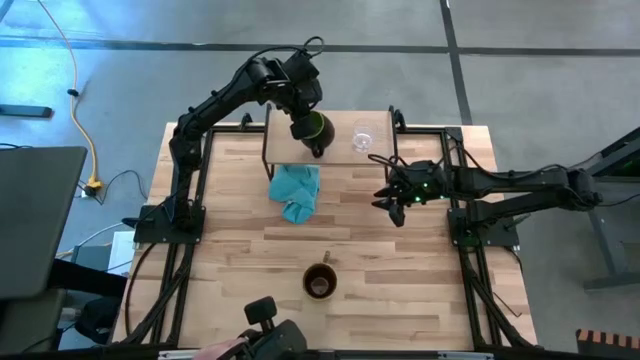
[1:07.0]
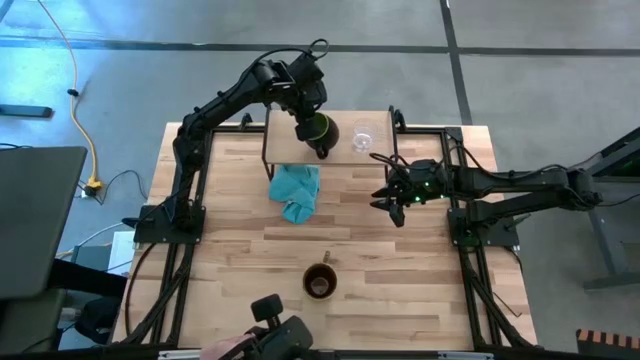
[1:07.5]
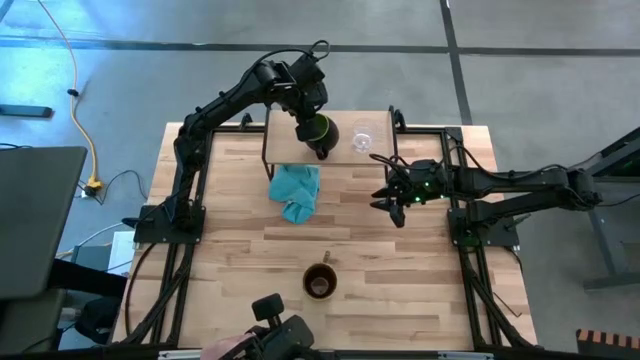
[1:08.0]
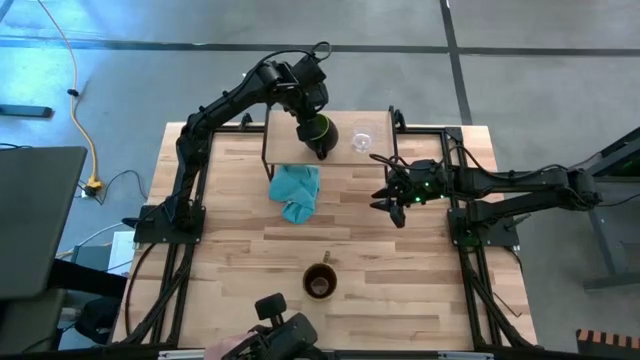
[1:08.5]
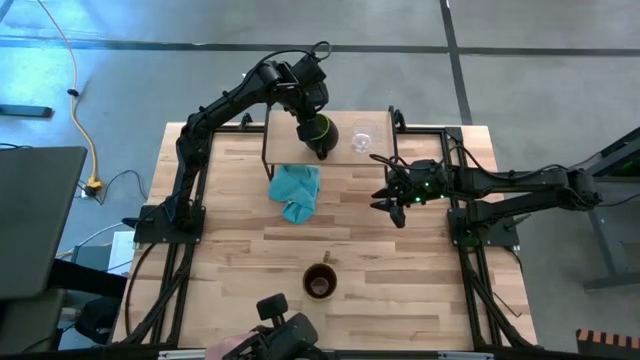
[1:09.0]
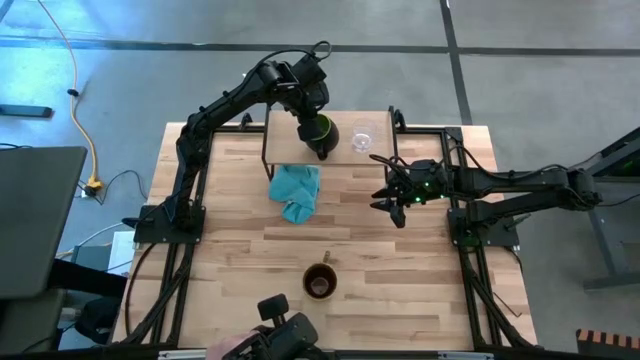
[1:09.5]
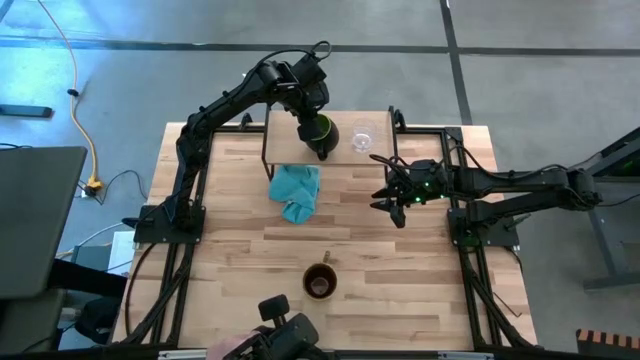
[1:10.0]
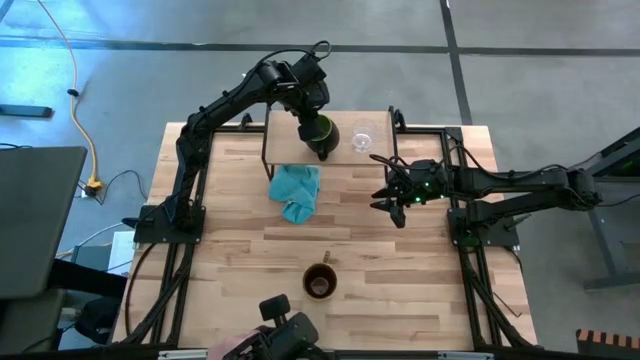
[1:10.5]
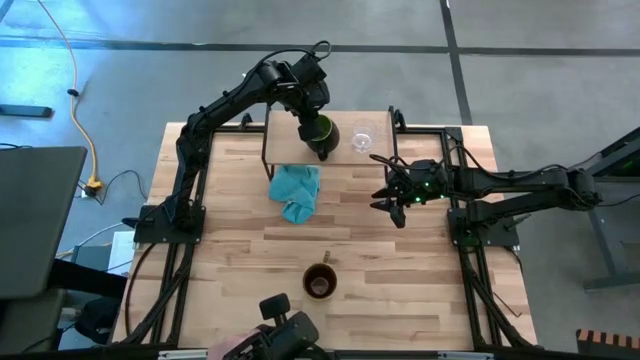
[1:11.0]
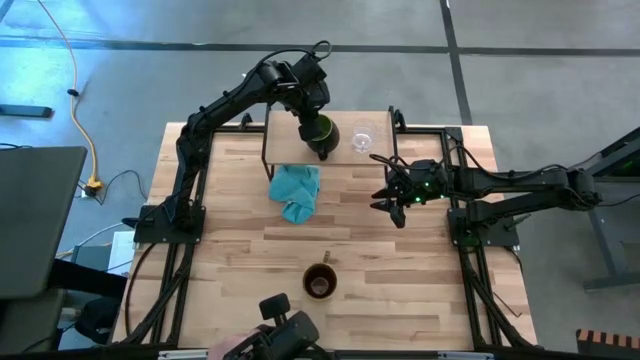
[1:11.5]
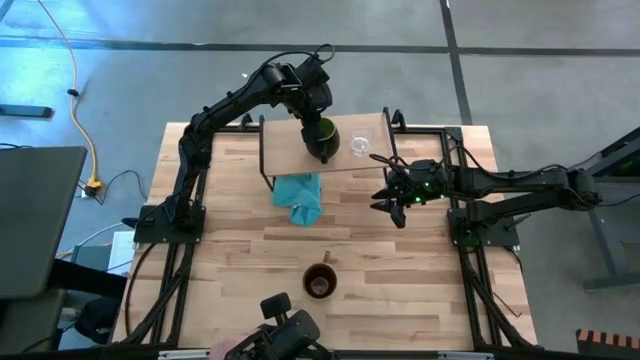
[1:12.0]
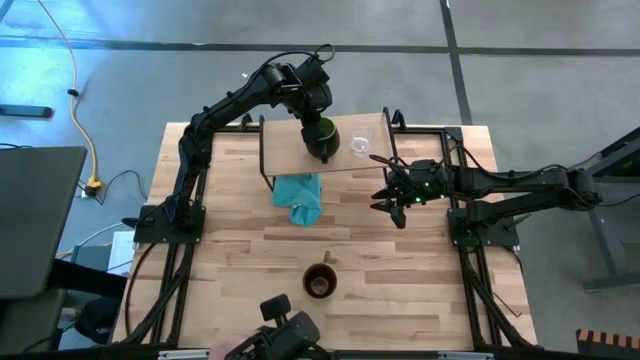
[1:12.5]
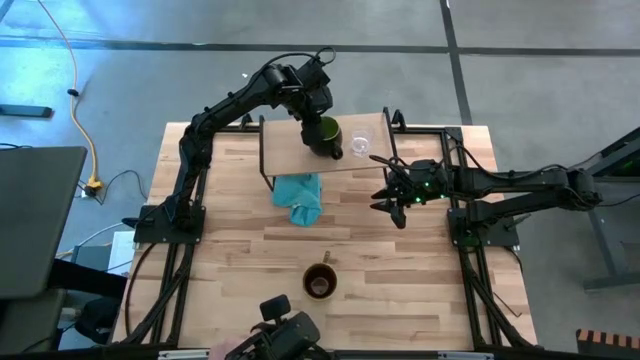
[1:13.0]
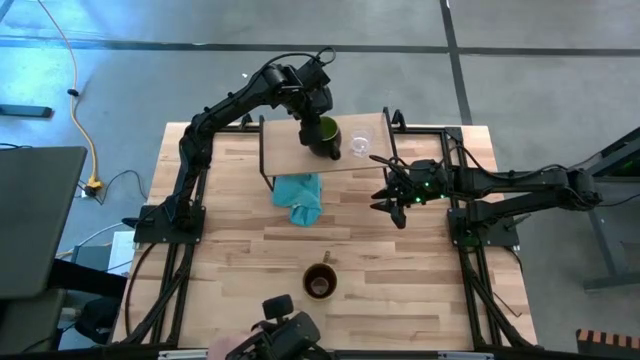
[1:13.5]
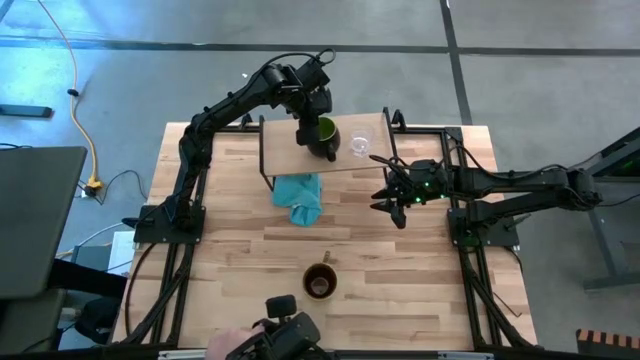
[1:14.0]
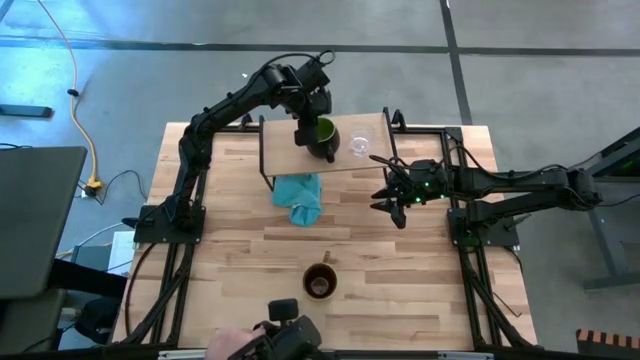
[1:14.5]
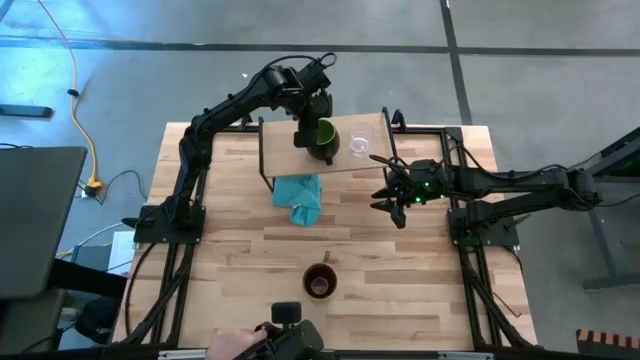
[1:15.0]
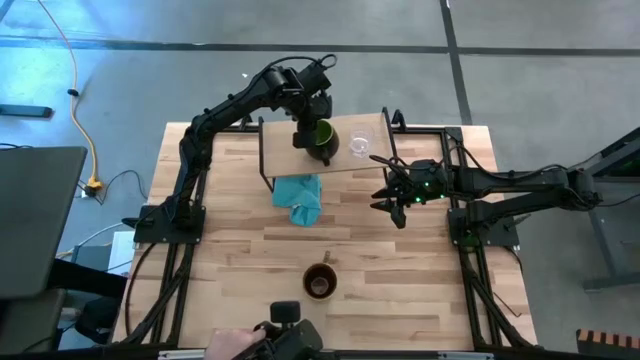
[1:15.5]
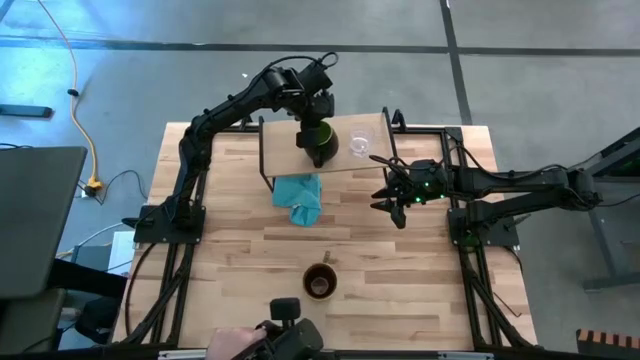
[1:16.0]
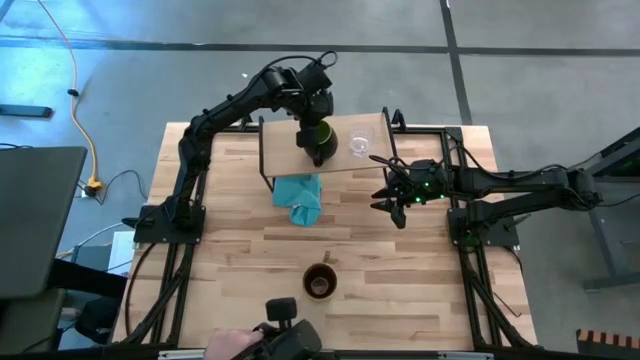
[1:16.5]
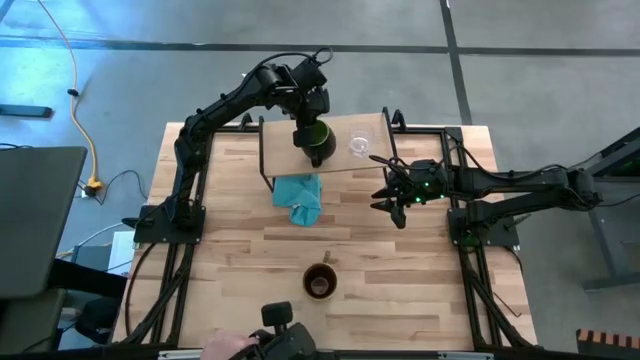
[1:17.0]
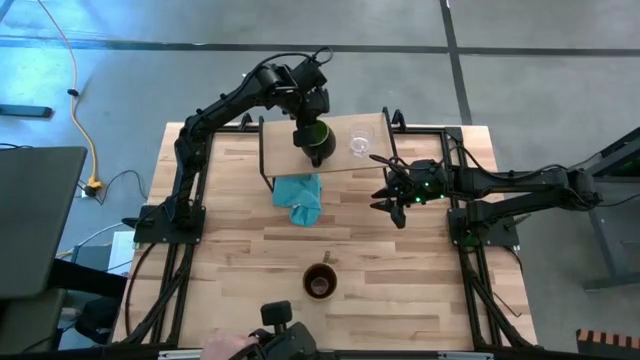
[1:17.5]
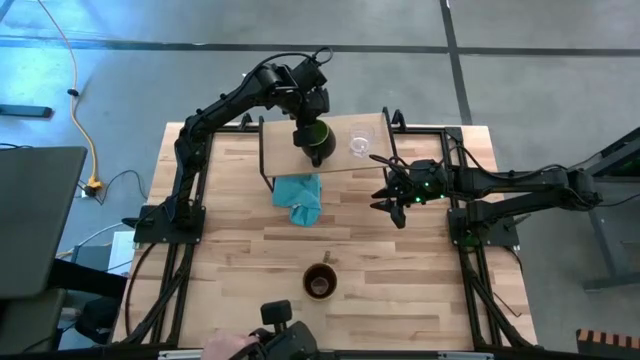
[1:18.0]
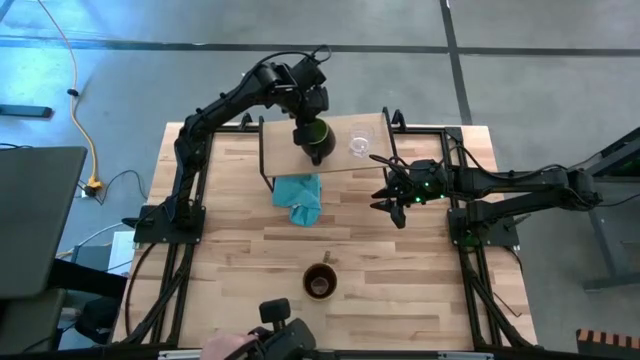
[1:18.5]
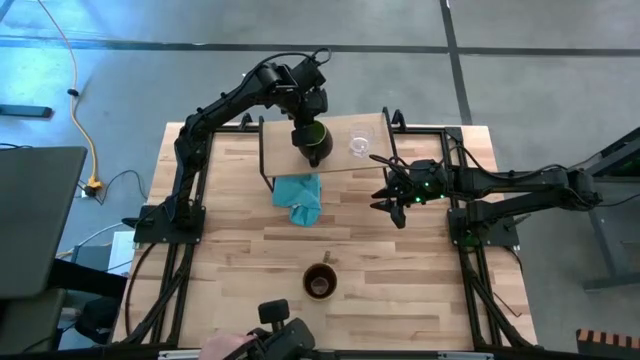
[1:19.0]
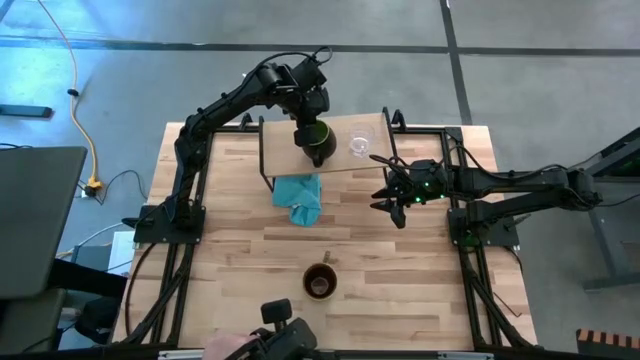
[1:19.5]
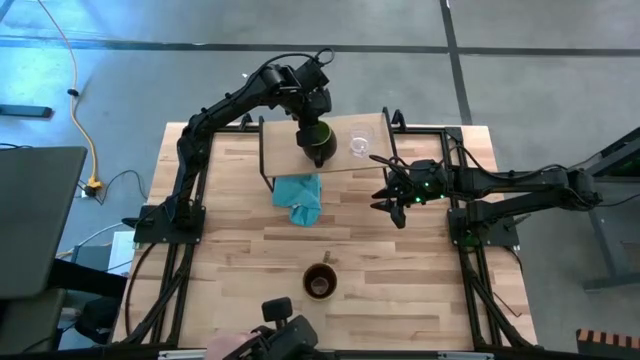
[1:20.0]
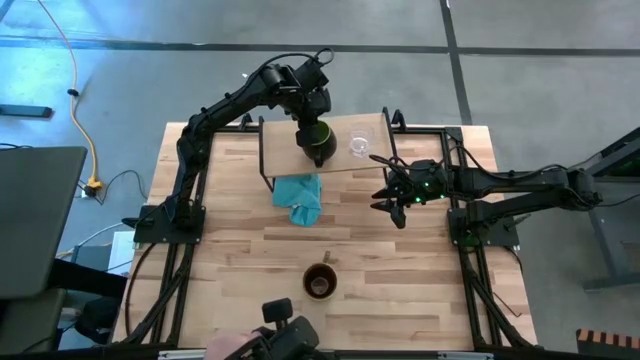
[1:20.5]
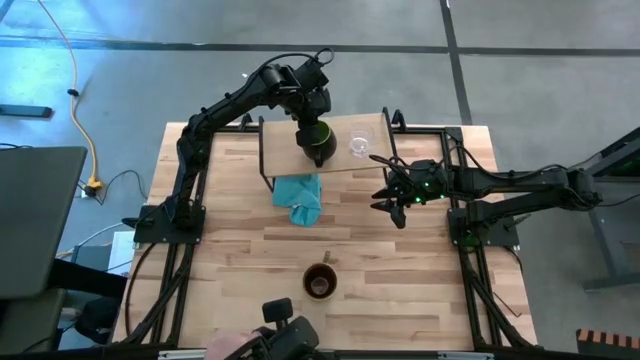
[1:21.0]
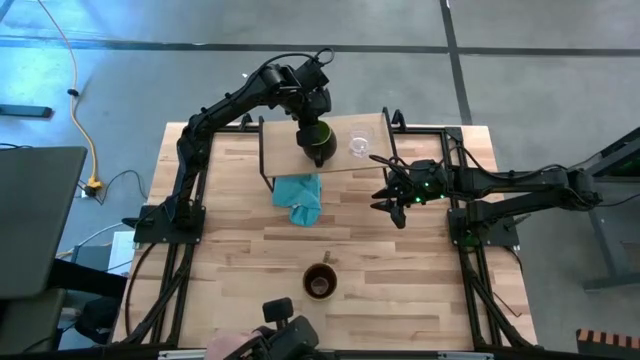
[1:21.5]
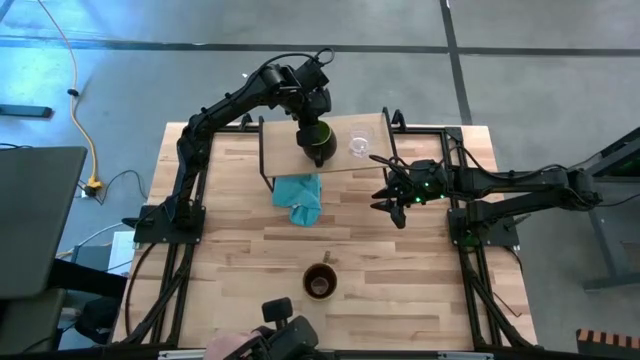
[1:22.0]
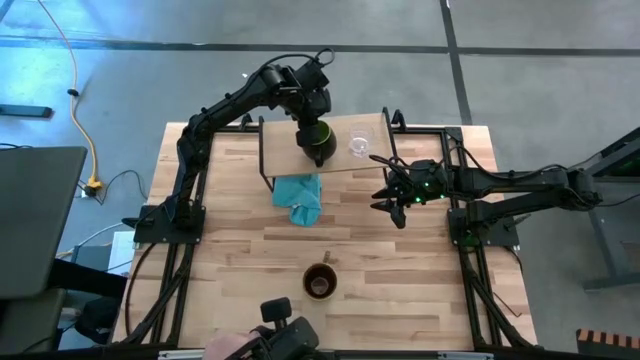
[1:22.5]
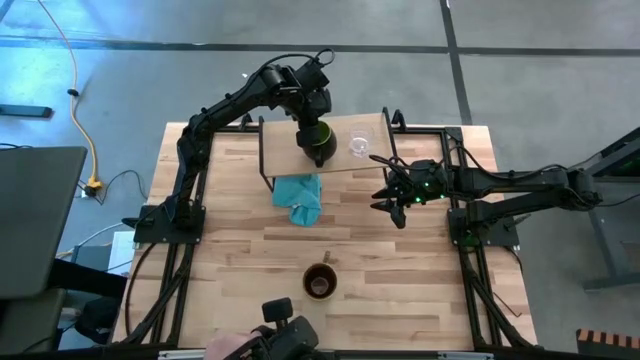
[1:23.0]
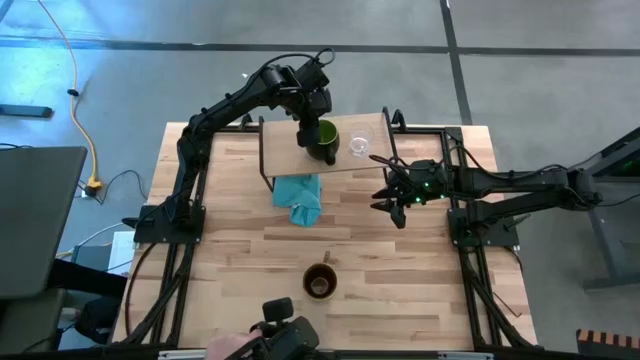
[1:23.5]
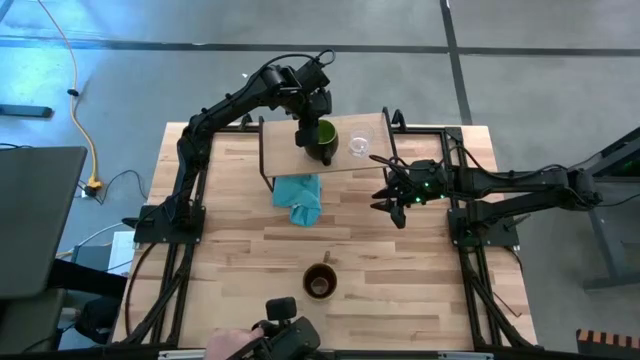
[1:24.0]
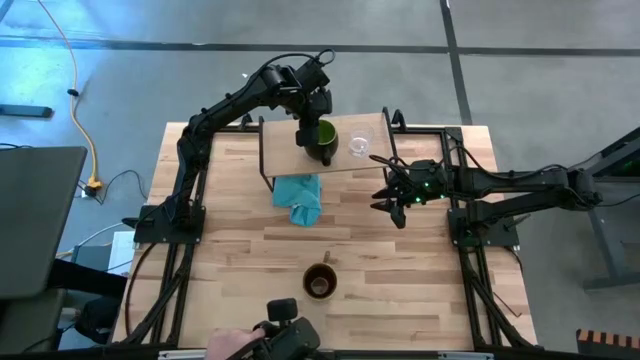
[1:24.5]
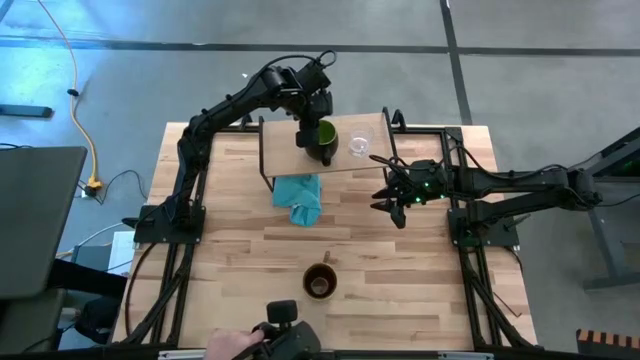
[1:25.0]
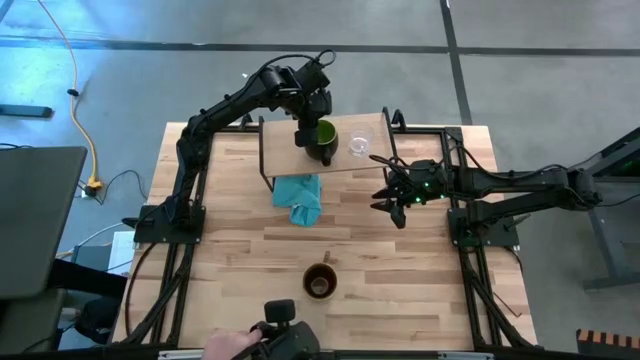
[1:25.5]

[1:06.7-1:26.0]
Task: Stack small to large cups/mugs on shelf
Put the black mug on the shelf

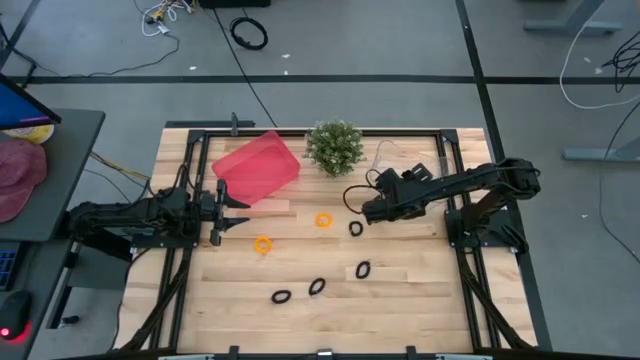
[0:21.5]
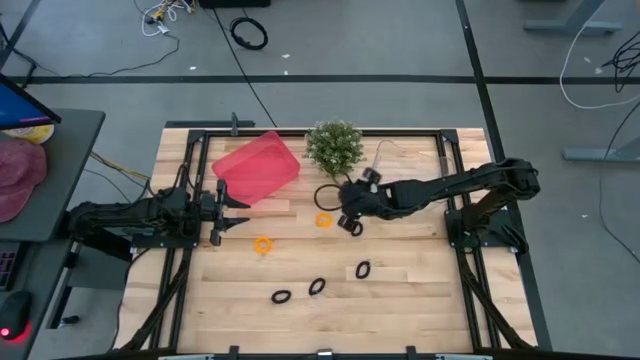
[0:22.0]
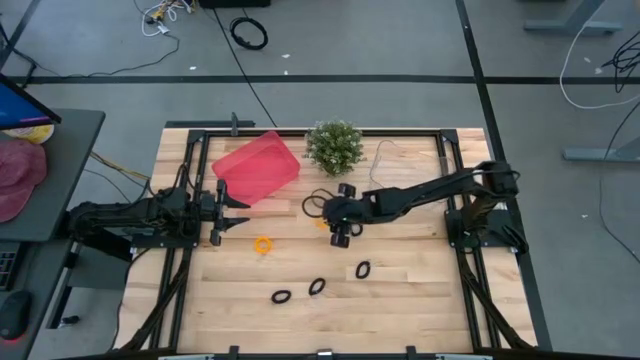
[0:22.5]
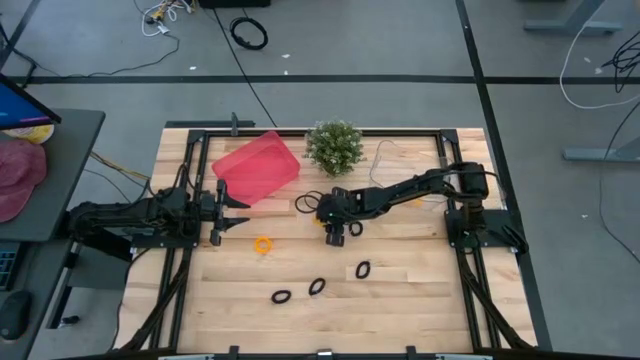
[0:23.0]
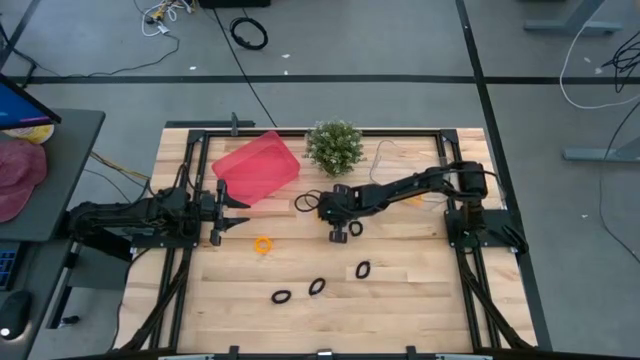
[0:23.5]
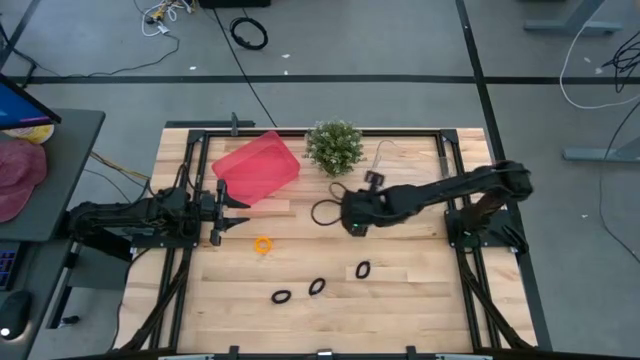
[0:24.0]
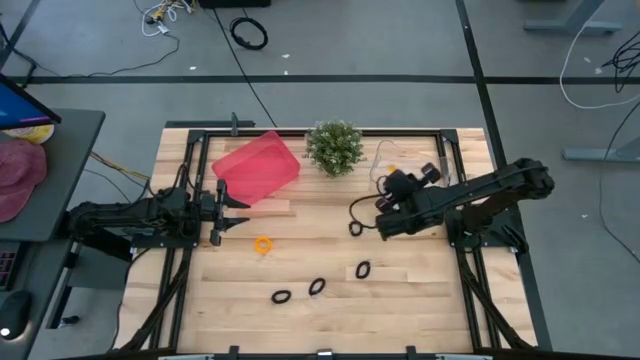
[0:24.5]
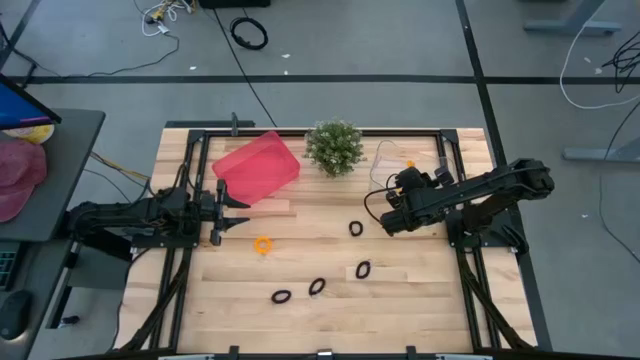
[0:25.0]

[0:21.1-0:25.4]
Task: Sort spring keychains
Put the right orange spring keychain into the transparent bin
